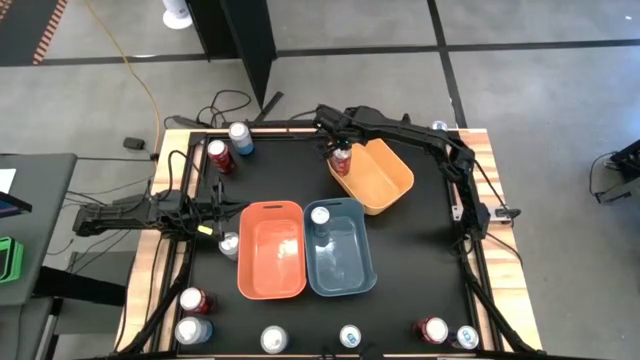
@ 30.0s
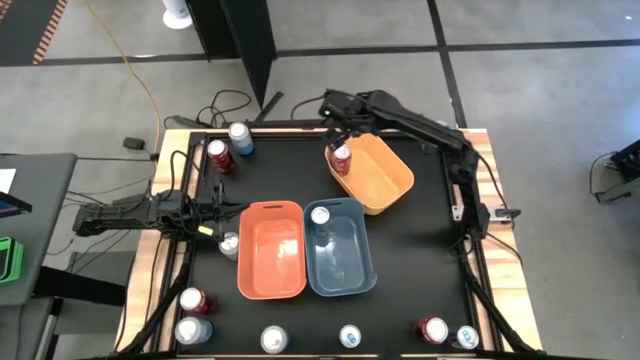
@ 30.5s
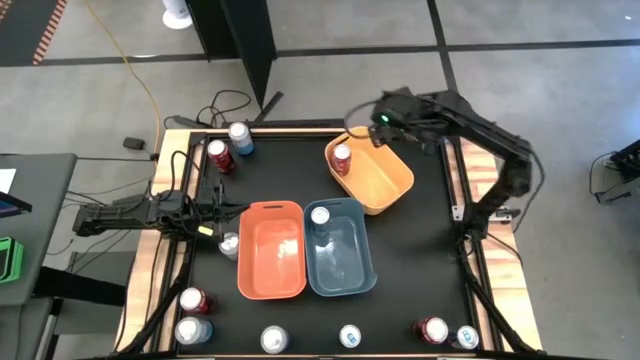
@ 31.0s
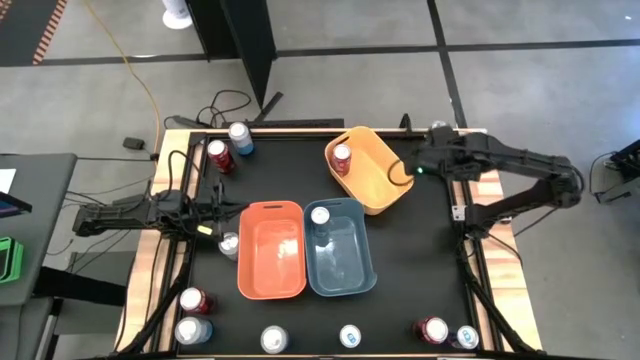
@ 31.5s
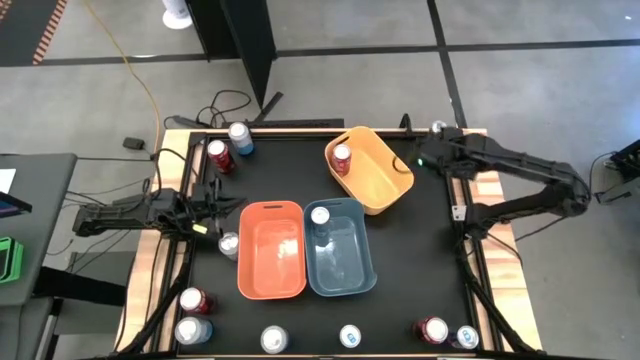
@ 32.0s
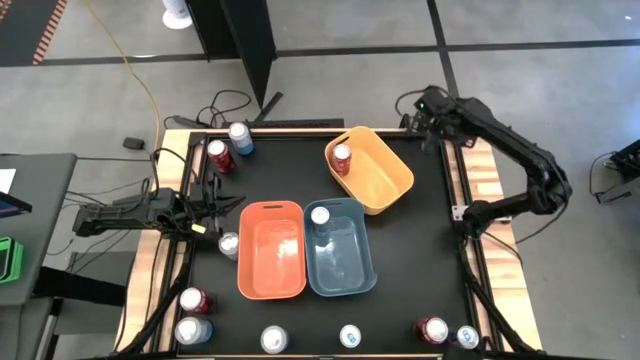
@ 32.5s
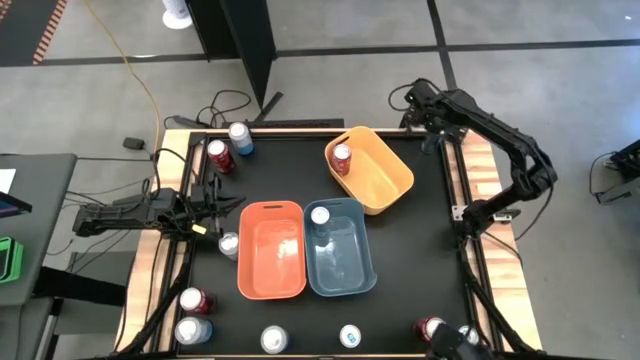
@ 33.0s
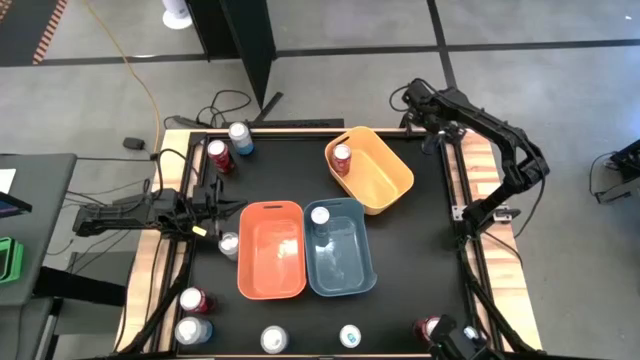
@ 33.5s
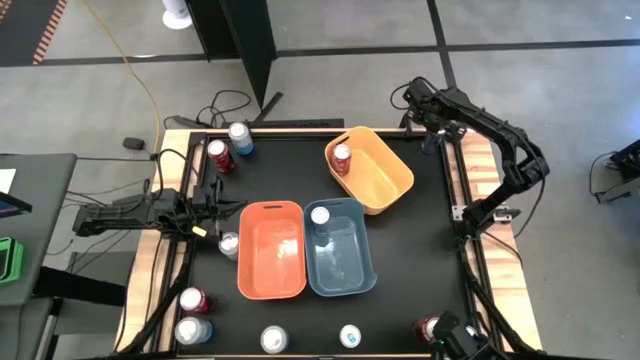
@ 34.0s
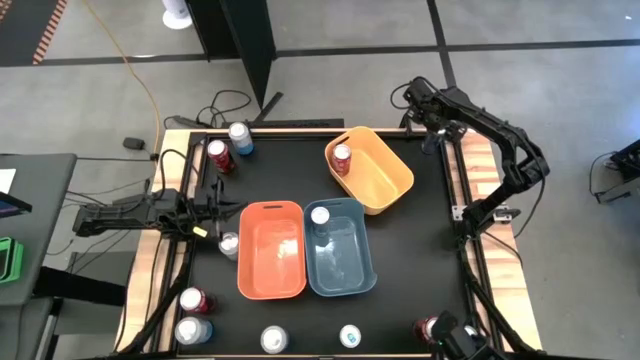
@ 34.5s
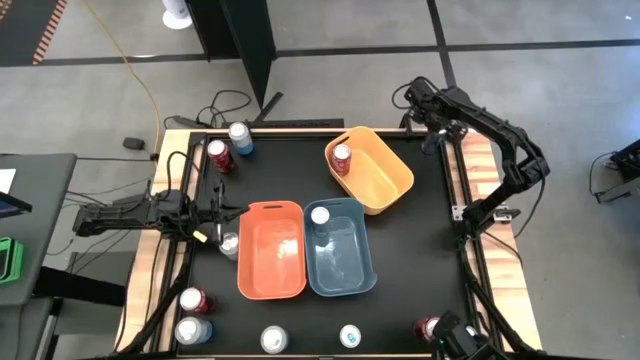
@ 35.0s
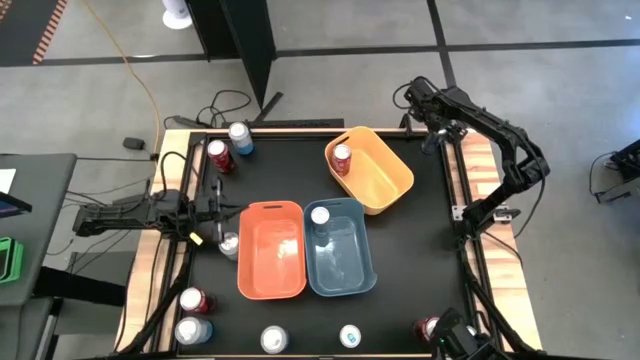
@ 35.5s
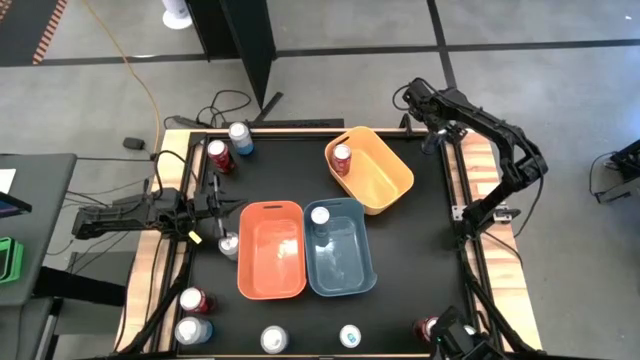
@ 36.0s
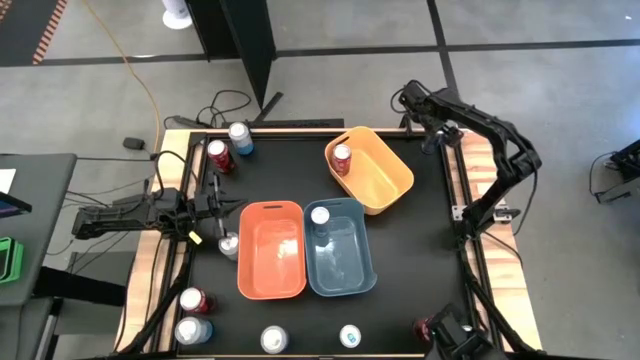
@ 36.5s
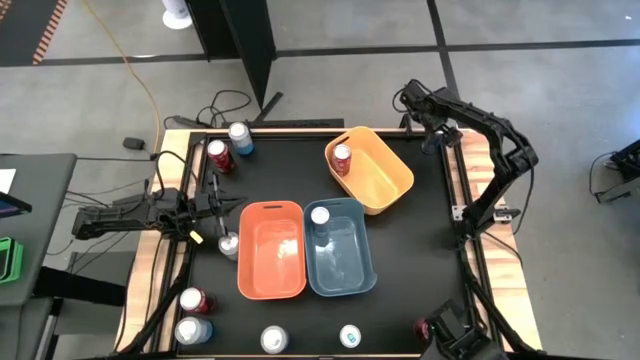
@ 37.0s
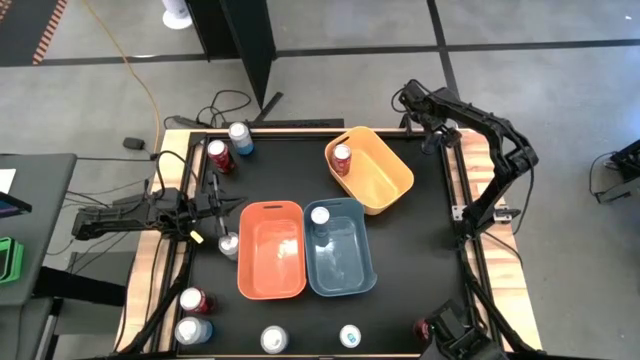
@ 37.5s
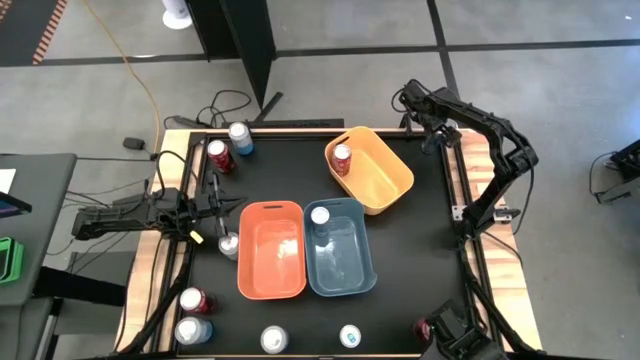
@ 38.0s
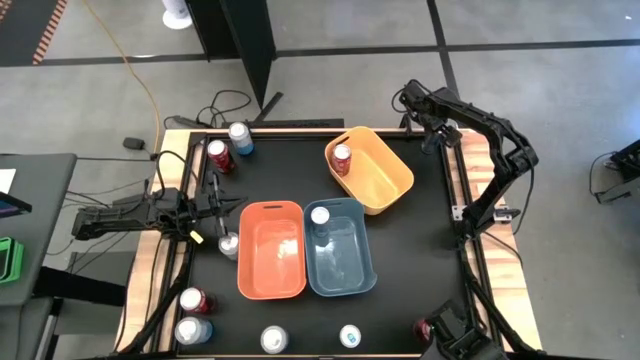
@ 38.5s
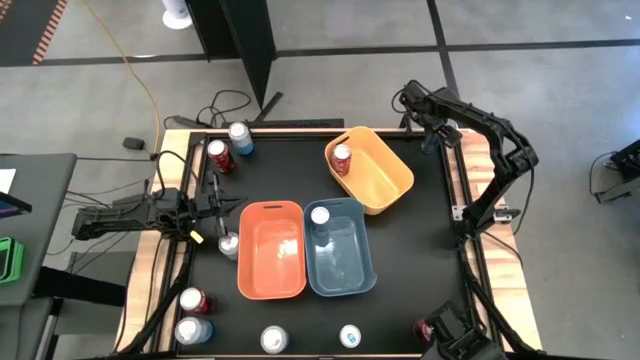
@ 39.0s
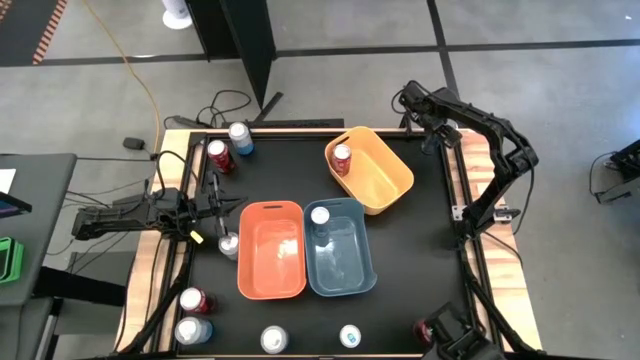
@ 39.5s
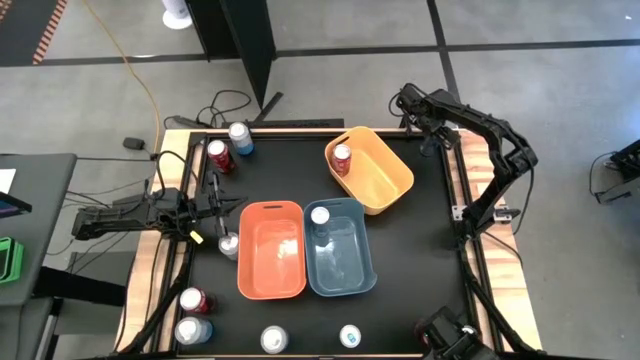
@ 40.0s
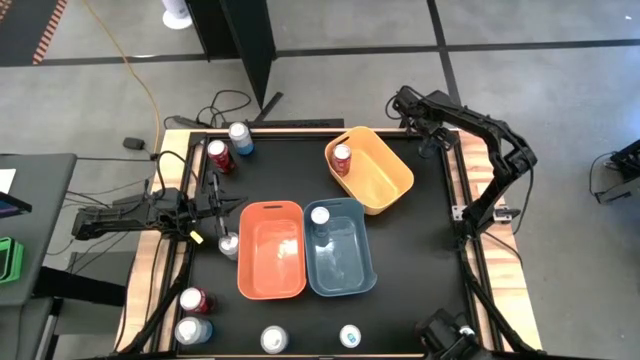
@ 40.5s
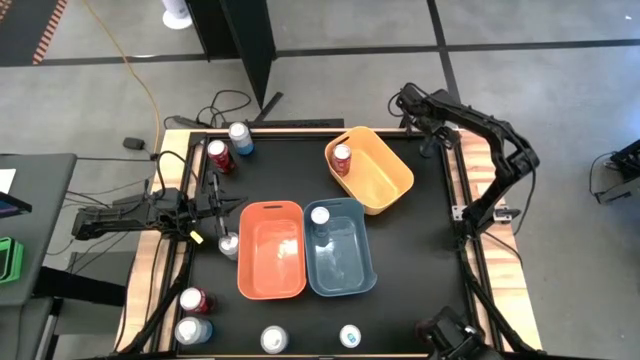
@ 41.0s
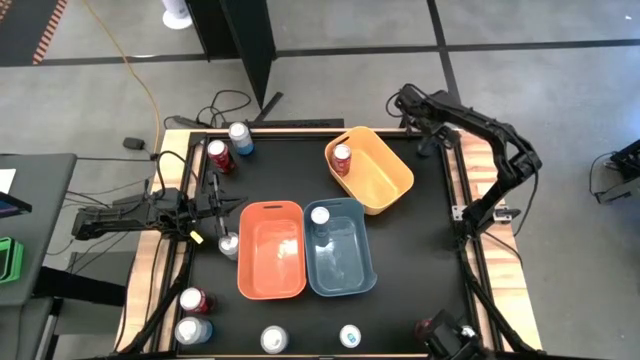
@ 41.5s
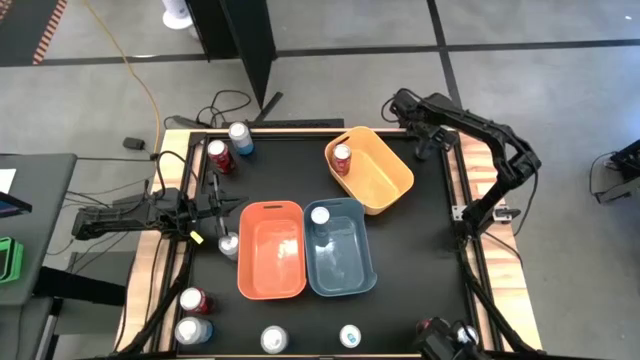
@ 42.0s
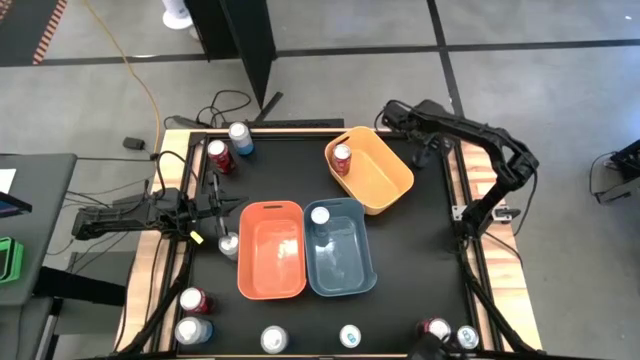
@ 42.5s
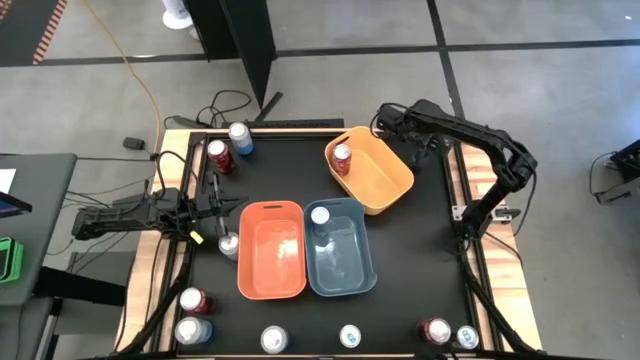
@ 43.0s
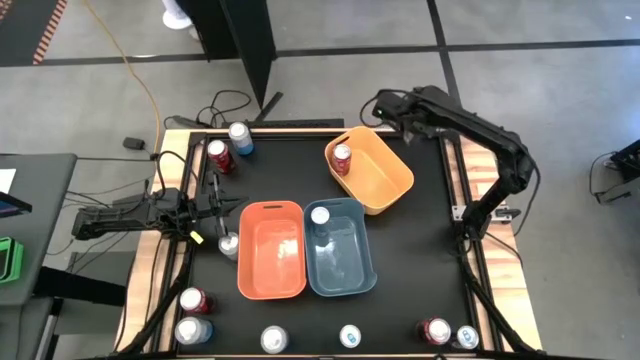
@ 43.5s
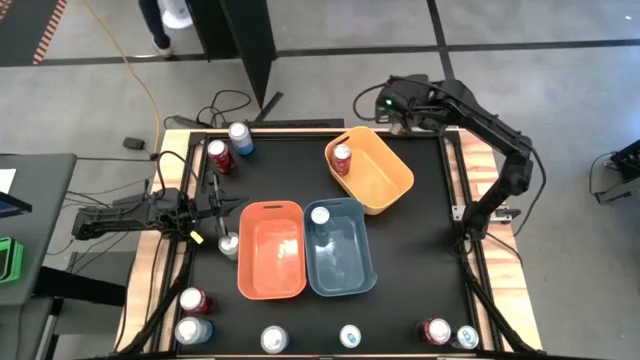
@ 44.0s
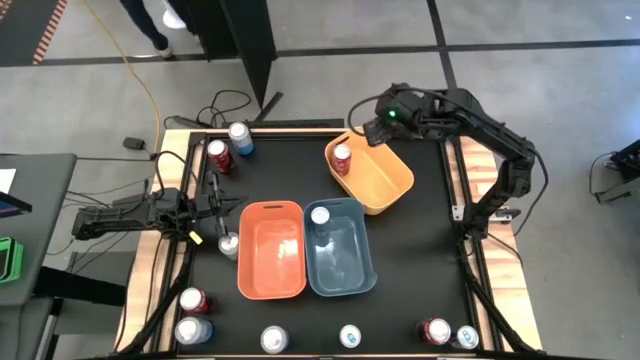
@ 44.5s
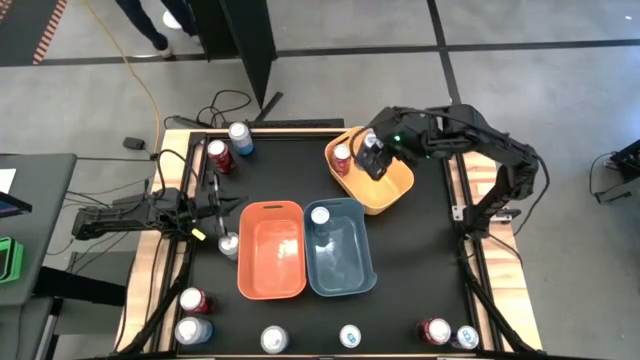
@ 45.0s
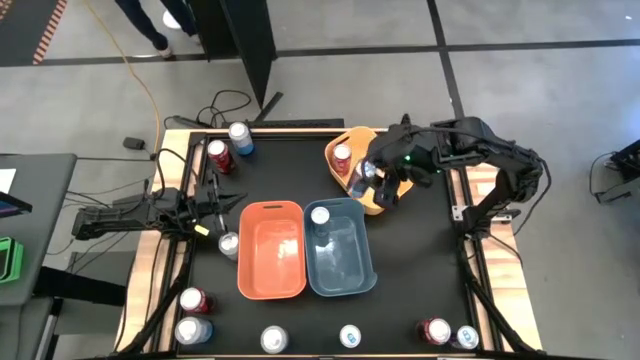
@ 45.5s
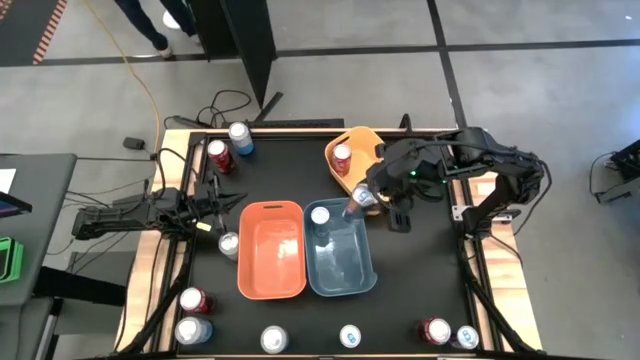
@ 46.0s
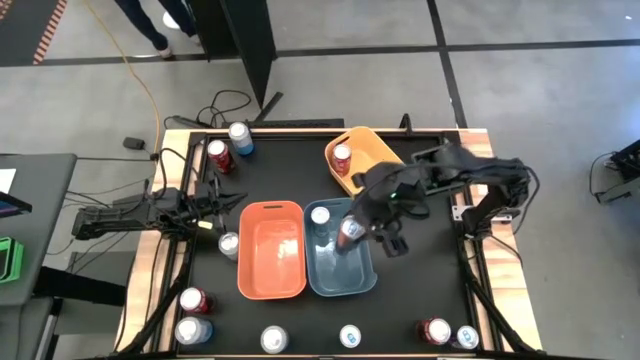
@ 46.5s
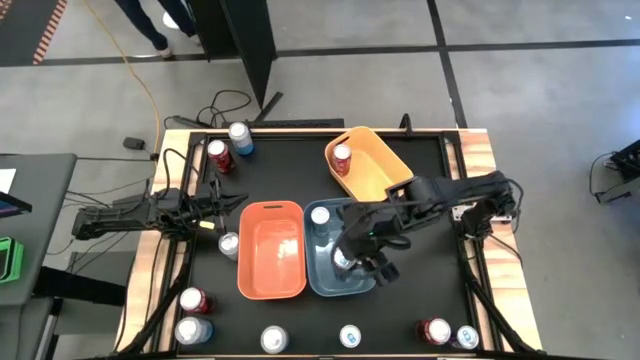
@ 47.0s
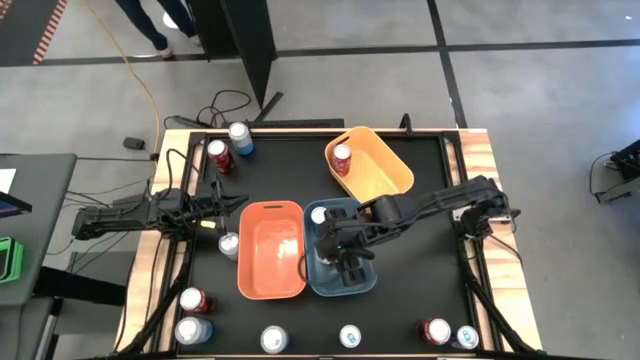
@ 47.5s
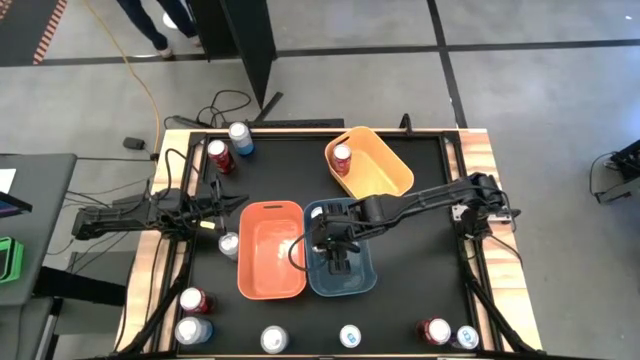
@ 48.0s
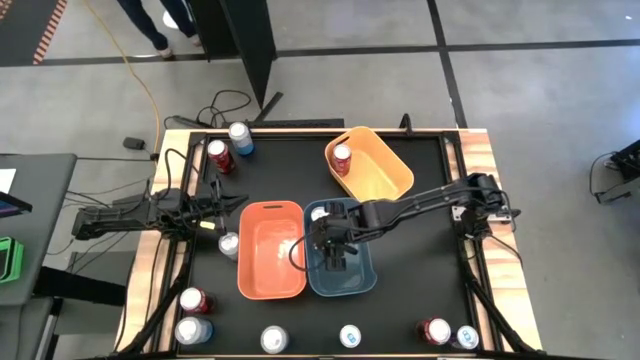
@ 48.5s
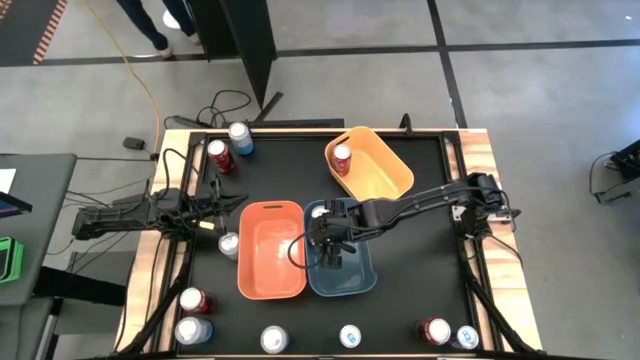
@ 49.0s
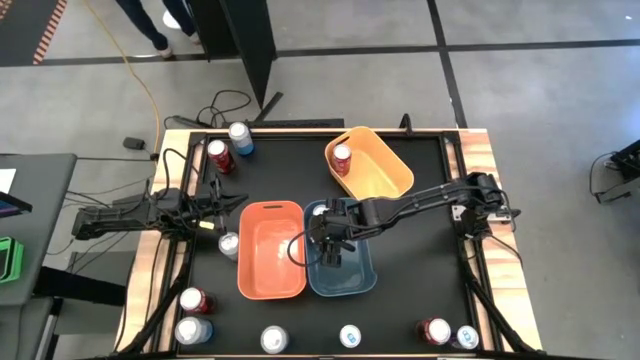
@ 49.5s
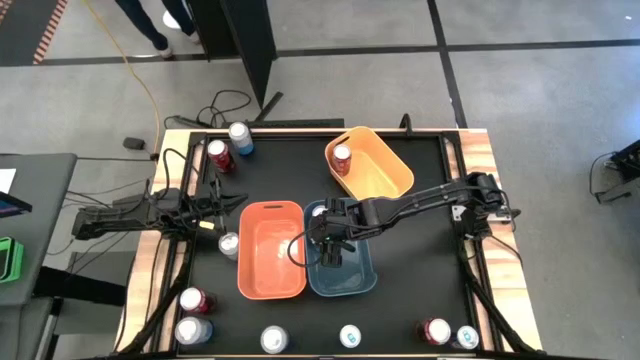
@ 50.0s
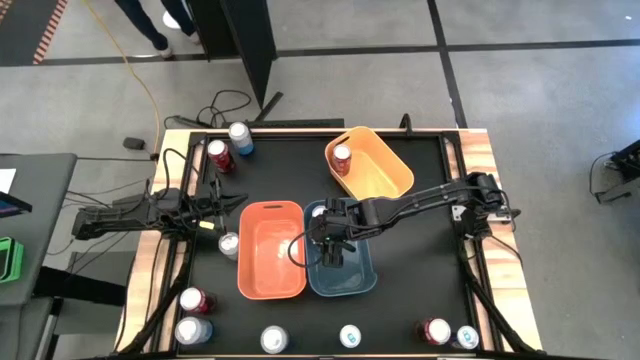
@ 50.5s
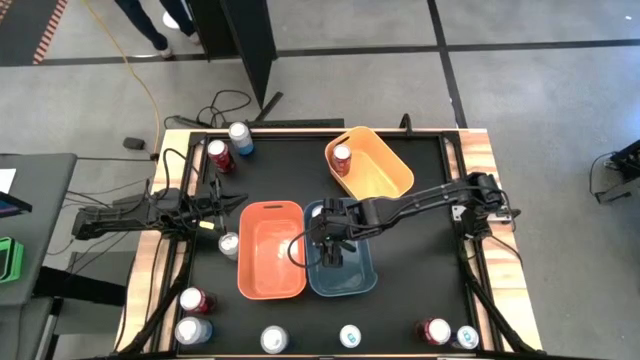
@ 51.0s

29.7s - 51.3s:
Task: Sort soda cans
Put the top right blue soda can into the blue bin
